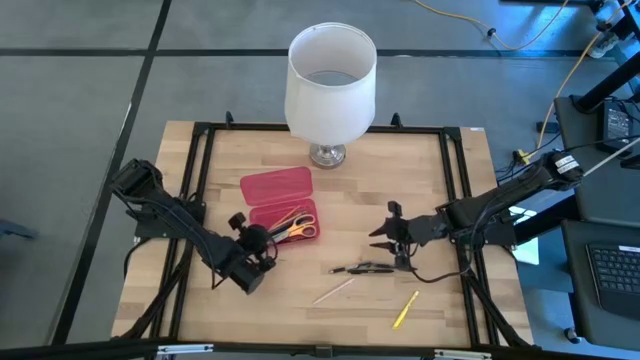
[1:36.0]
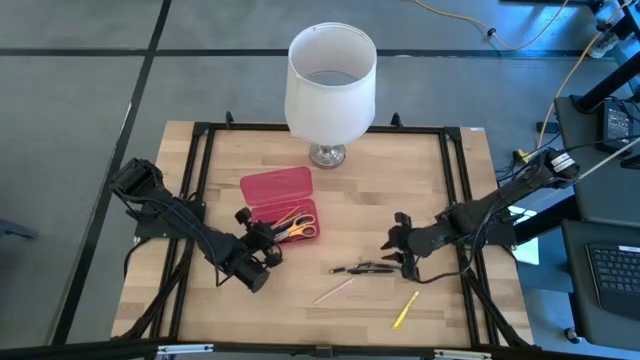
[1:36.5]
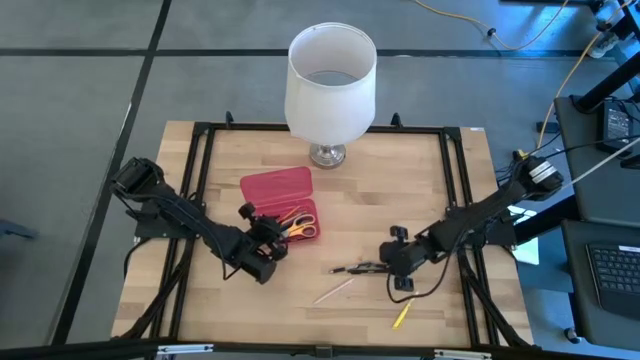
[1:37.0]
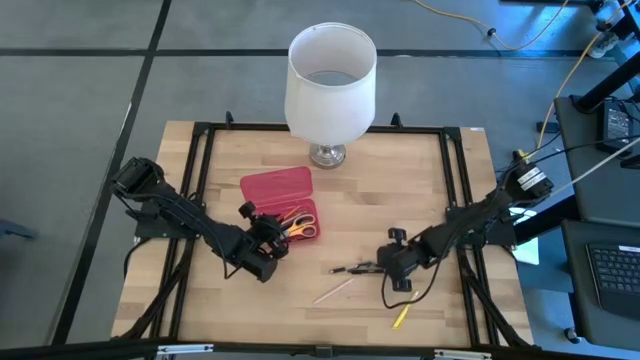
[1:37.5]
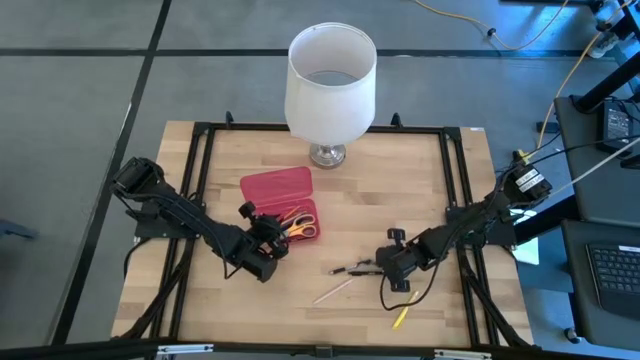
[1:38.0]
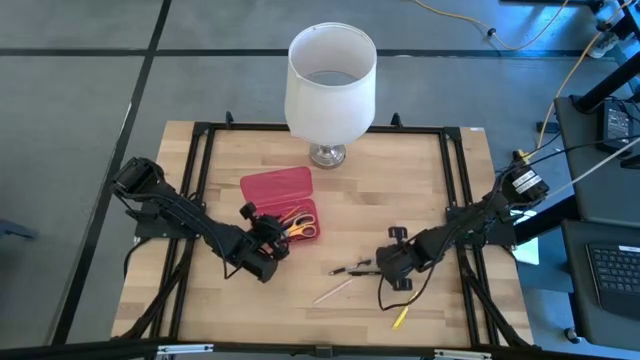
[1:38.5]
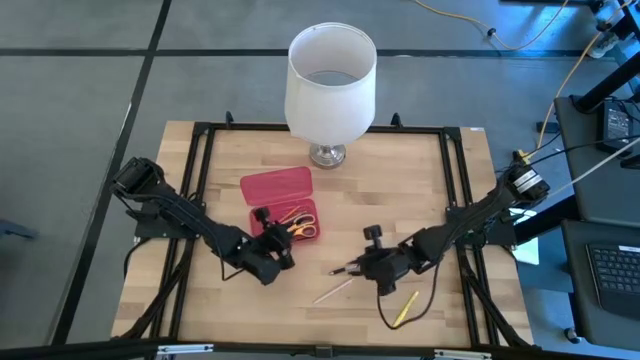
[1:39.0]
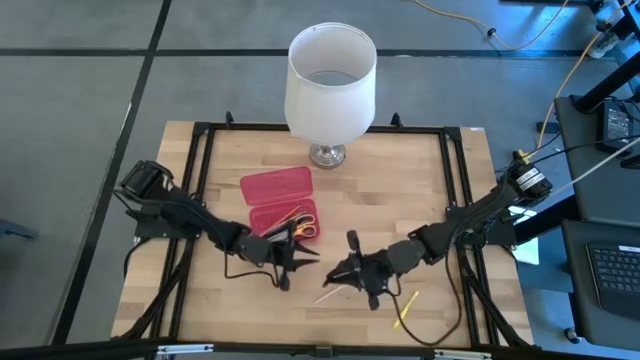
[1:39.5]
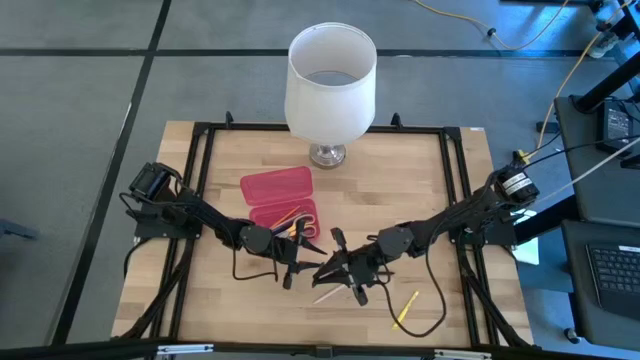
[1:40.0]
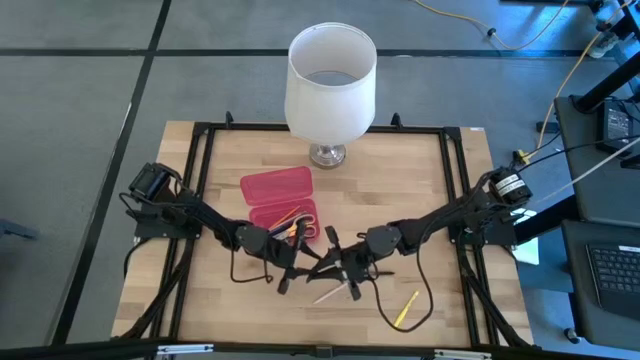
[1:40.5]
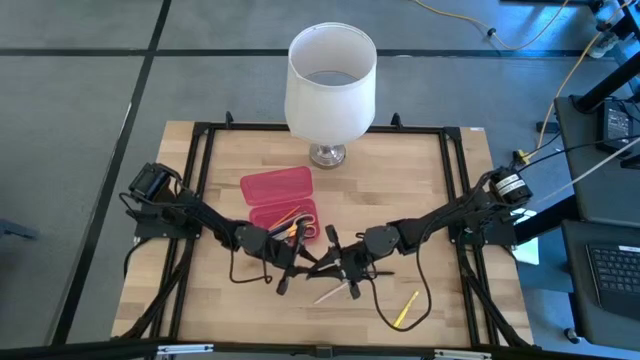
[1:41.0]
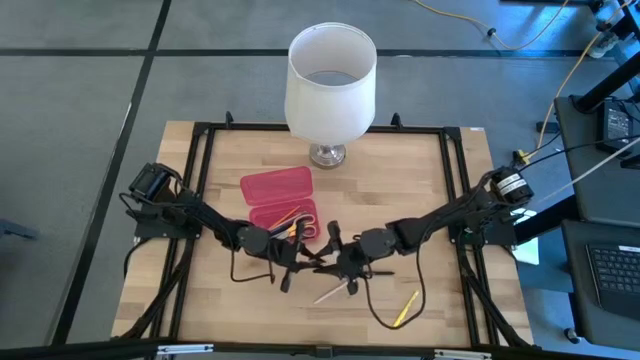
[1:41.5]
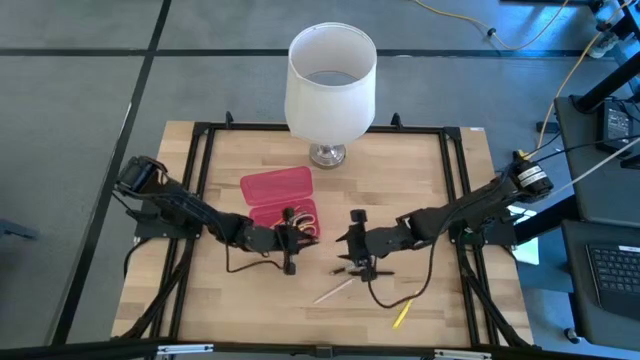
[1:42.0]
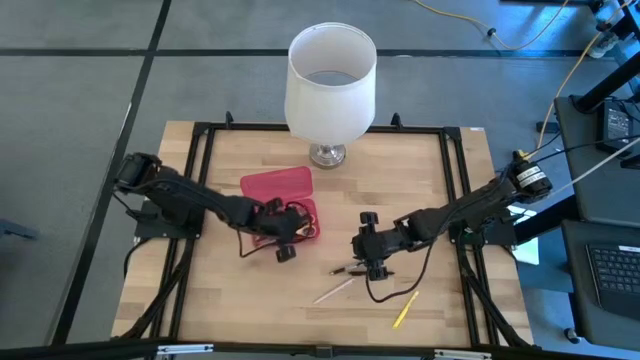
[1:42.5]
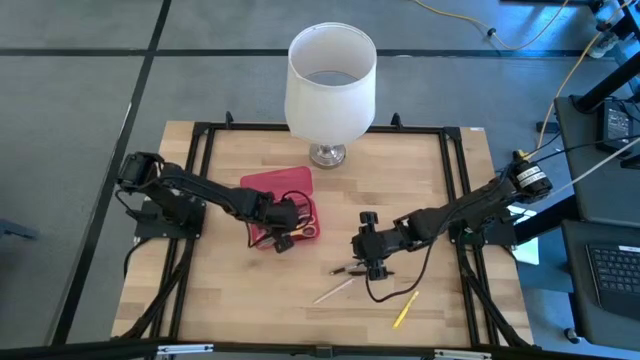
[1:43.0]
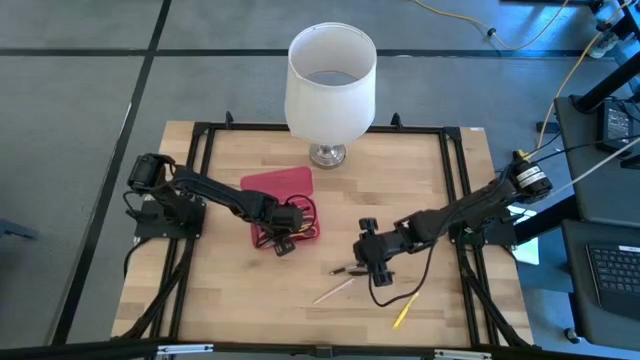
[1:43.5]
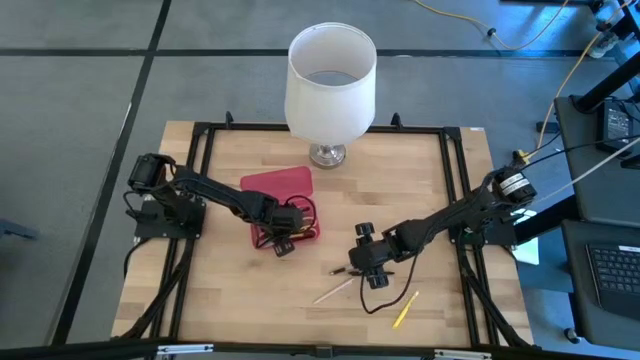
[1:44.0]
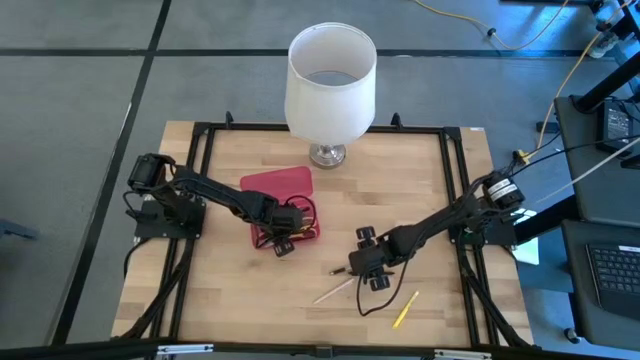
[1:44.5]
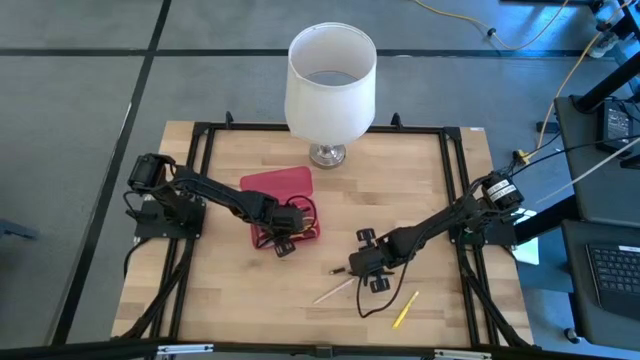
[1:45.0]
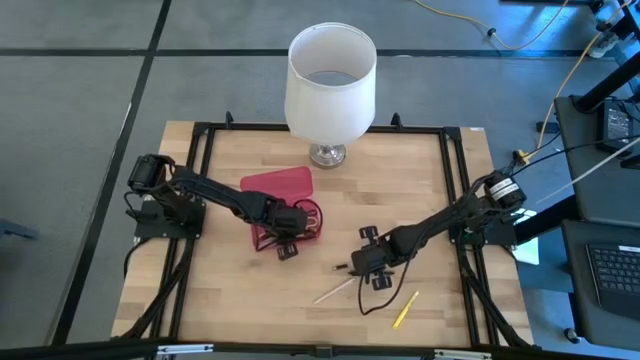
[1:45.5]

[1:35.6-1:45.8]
Task: Pick & place school supplies into a supply box
Put the right transparent pen into the red supply box

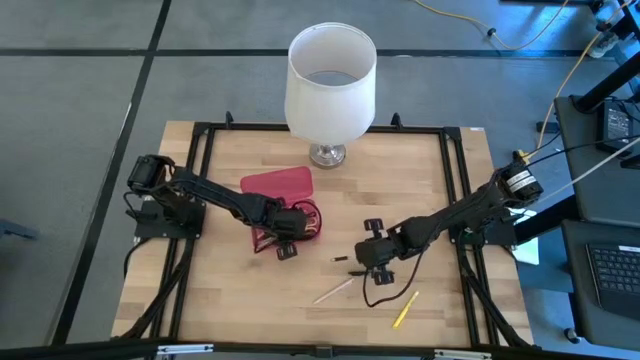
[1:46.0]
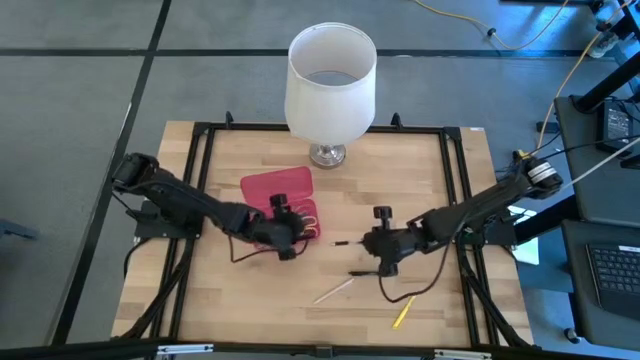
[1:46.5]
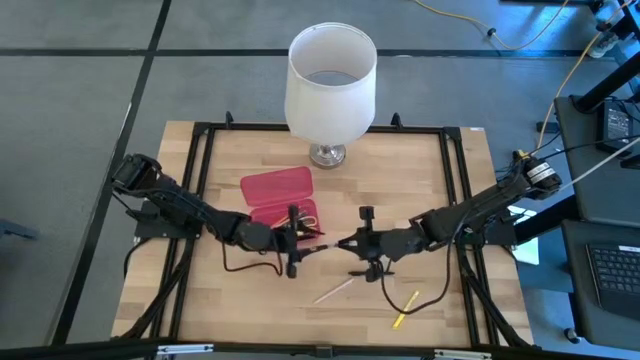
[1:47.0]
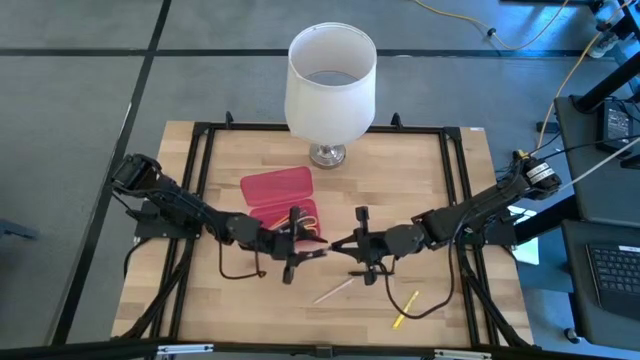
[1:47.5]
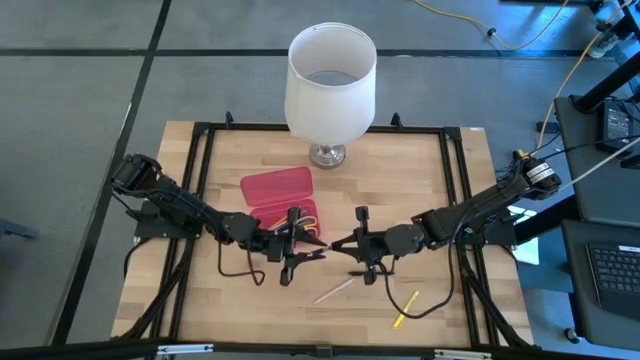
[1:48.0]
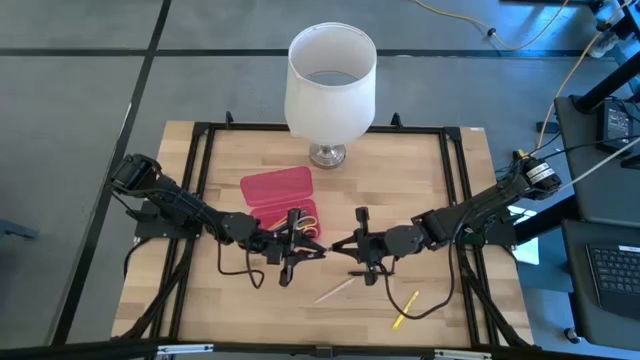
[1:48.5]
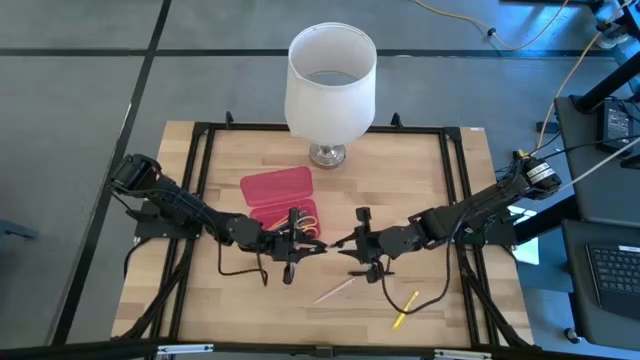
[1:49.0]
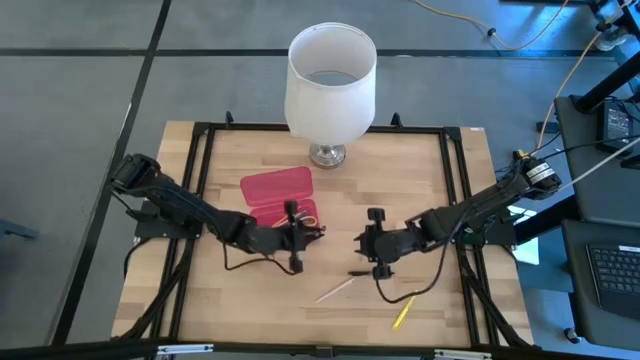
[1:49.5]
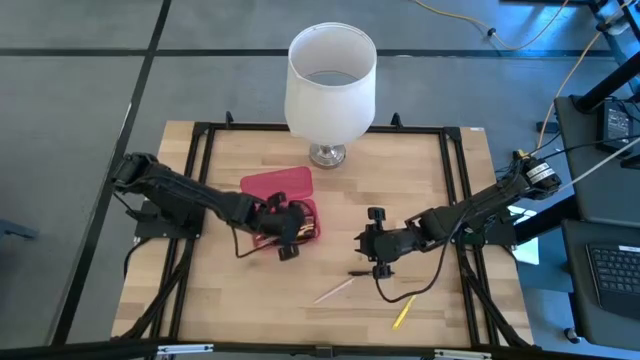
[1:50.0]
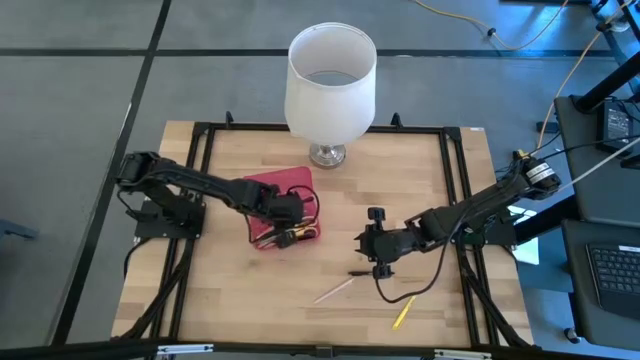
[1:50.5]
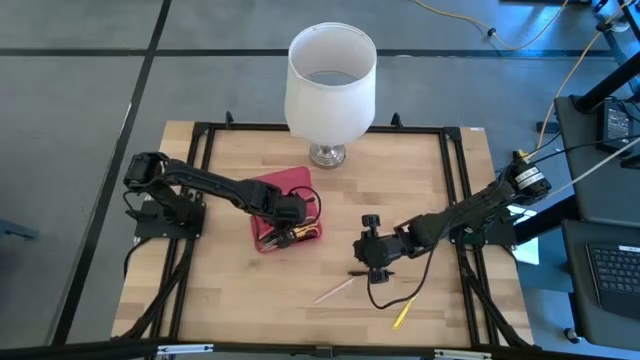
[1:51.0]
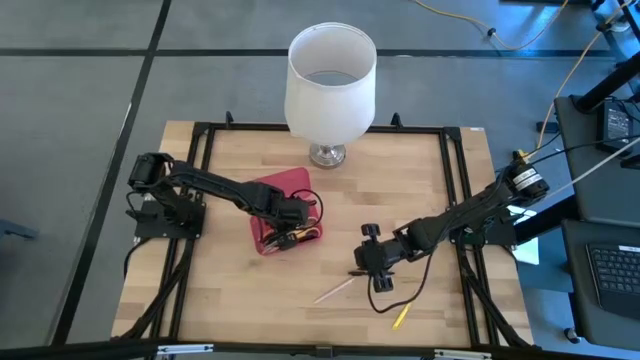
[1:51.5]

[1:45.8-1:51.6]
Put the transparent pen into the red supply box

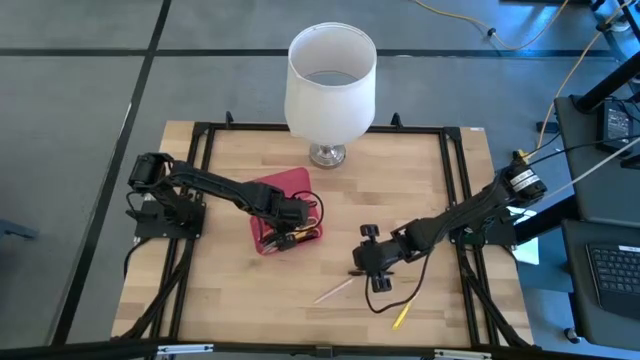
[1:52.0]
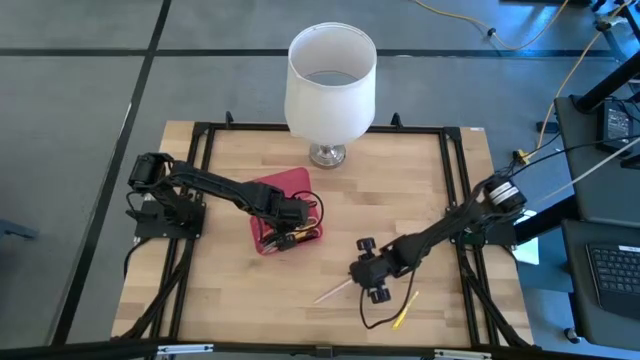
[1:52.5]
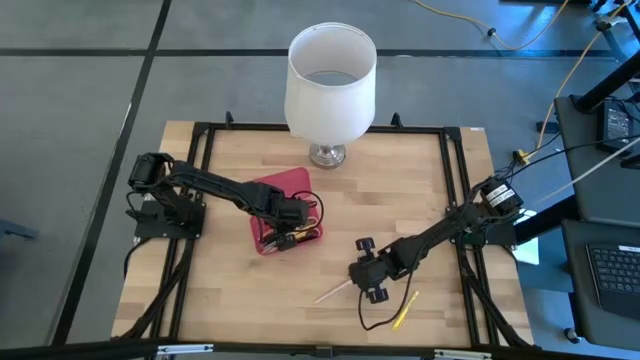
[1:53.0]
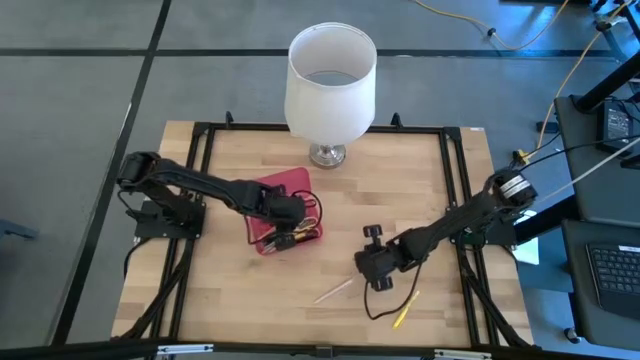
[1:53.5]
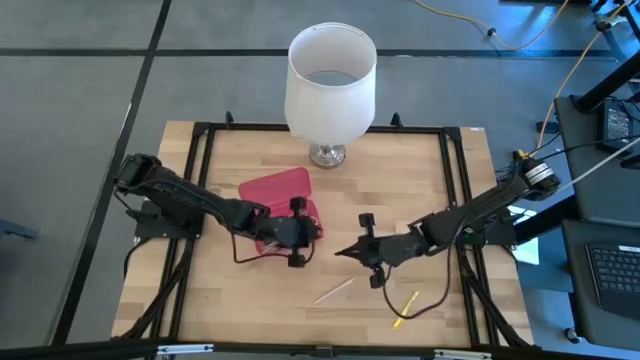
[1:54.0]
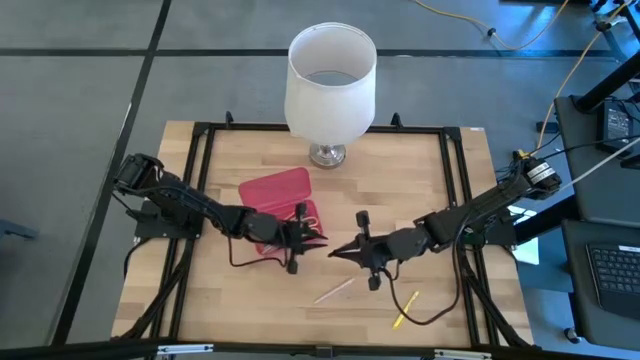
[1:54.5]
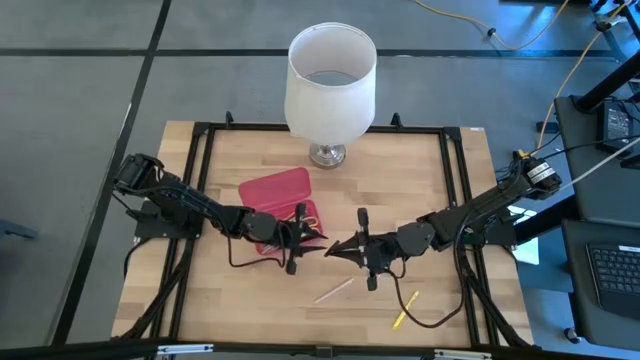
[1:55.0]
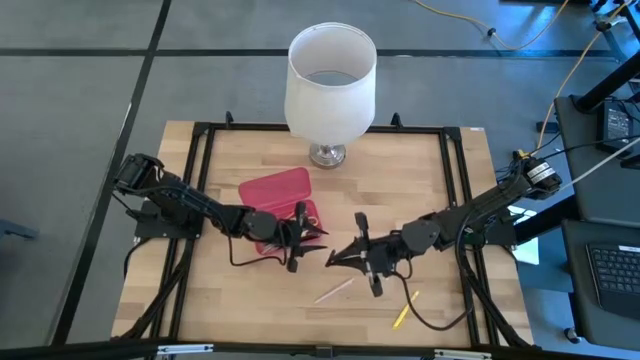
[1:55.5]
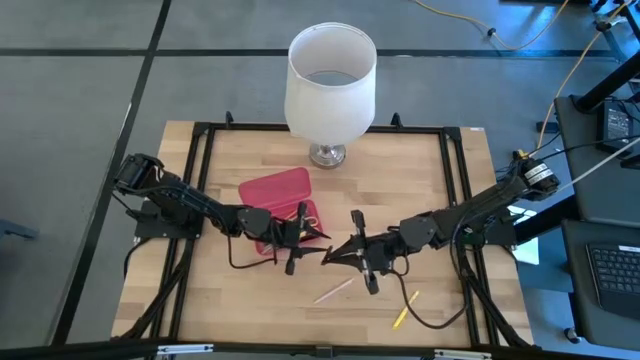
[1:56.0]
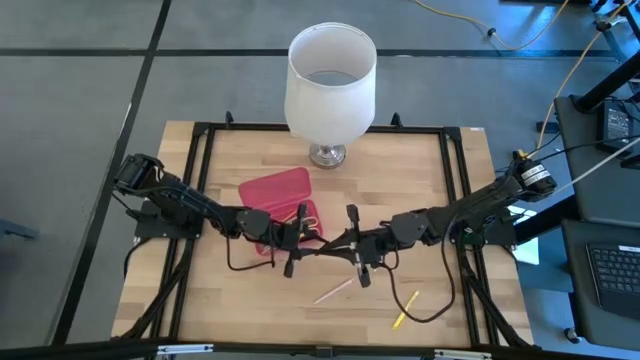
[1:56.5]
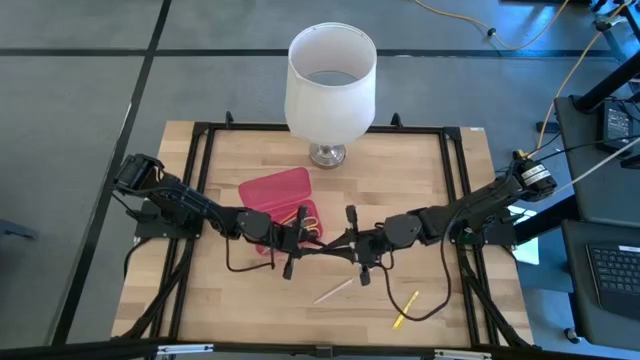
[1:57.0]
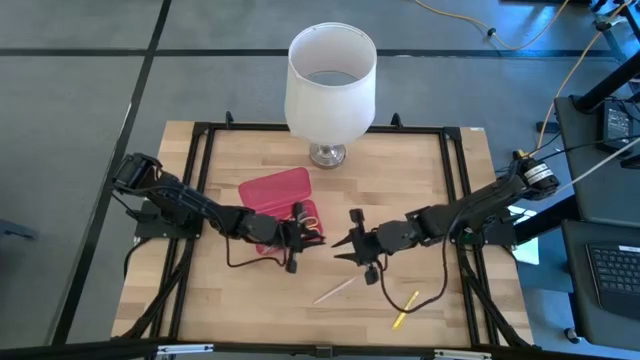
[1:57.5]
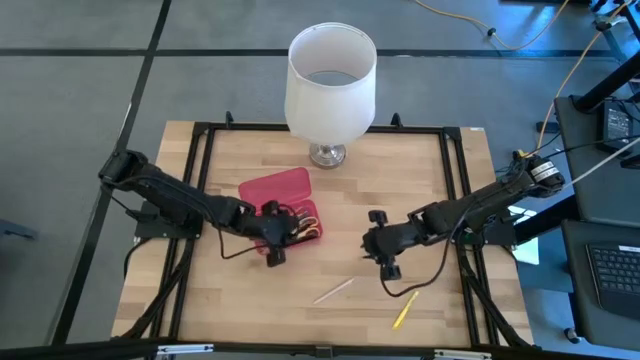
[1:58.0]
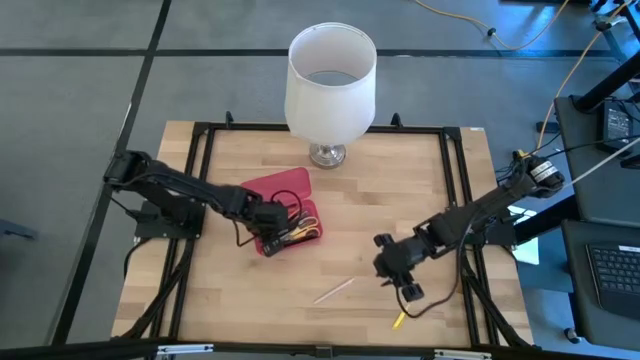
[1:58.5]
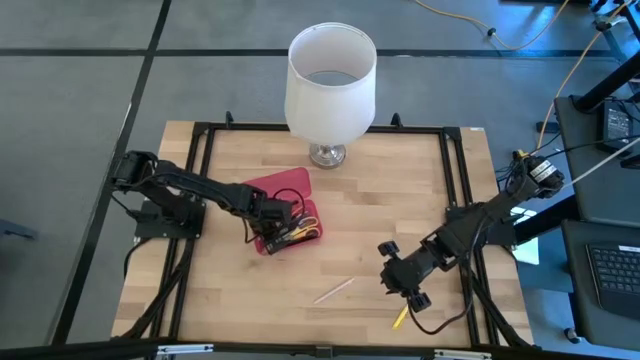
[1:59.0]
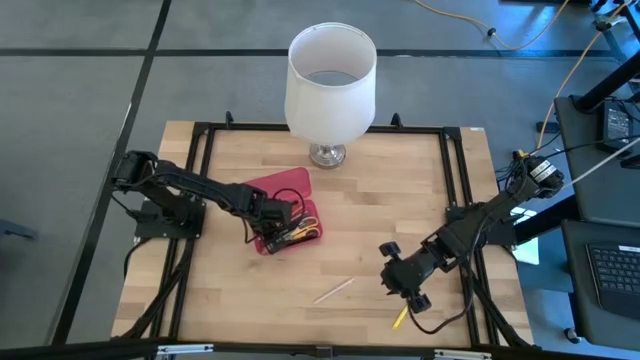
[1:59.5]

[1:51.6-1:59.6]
Put the black pen into the red supply box
